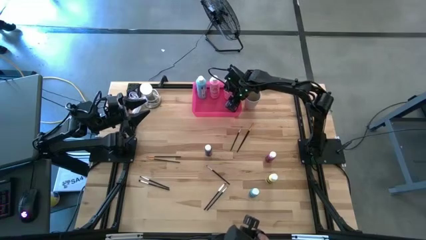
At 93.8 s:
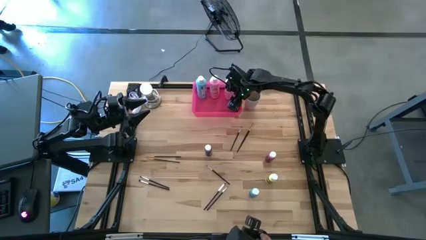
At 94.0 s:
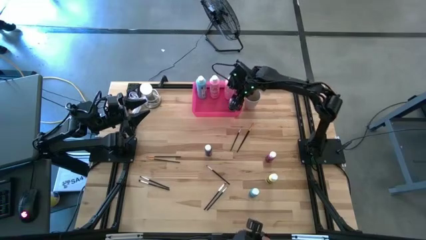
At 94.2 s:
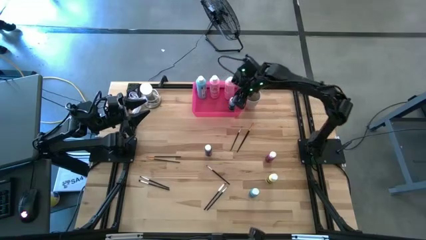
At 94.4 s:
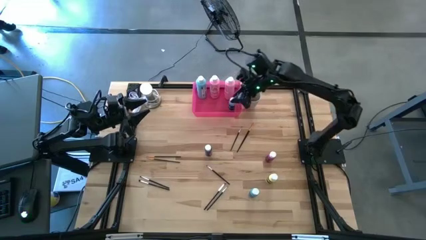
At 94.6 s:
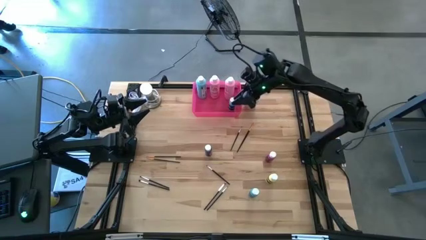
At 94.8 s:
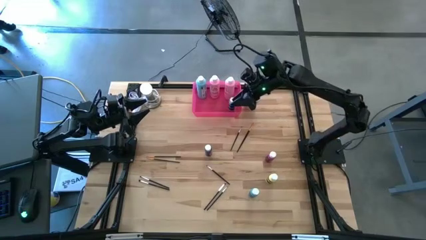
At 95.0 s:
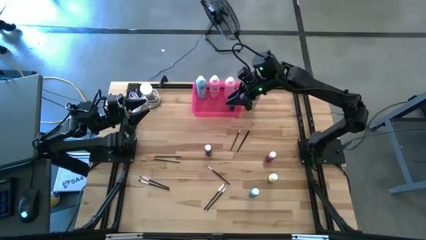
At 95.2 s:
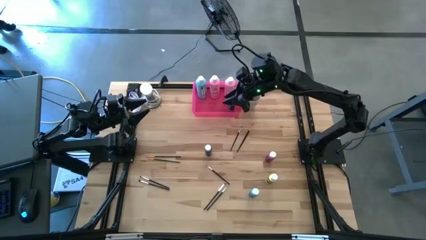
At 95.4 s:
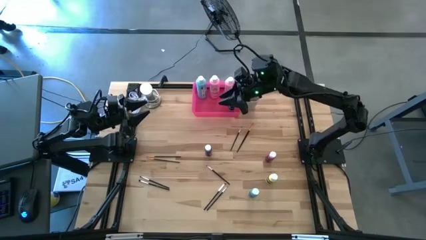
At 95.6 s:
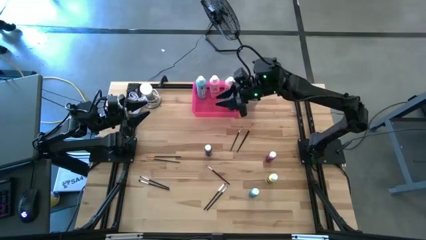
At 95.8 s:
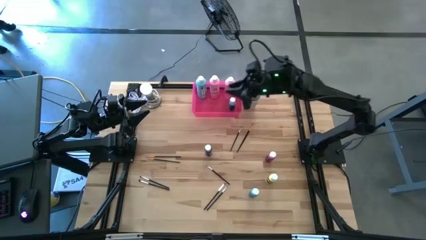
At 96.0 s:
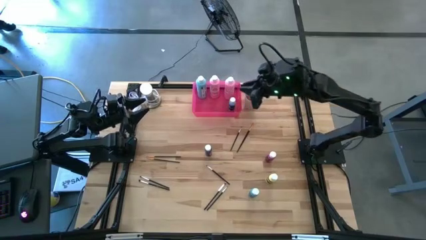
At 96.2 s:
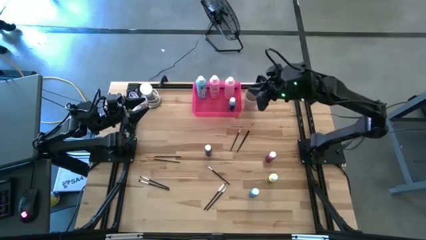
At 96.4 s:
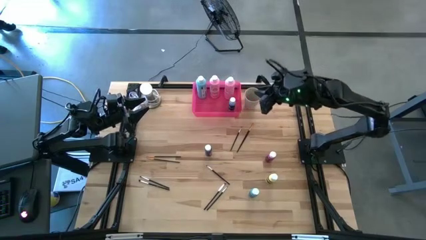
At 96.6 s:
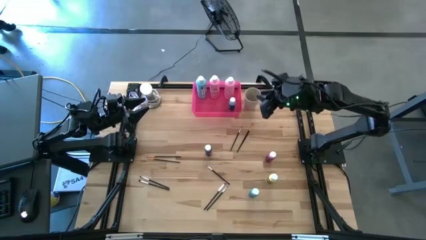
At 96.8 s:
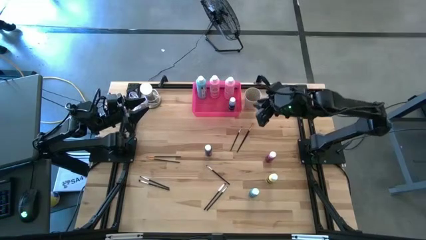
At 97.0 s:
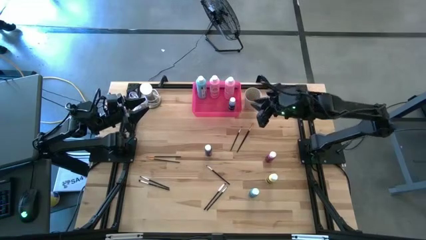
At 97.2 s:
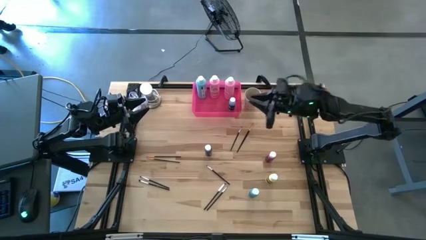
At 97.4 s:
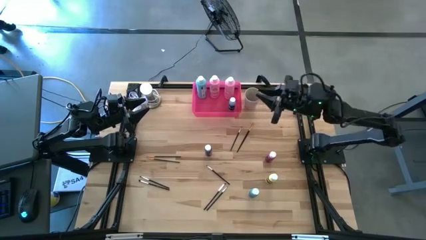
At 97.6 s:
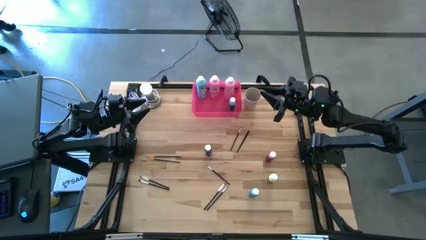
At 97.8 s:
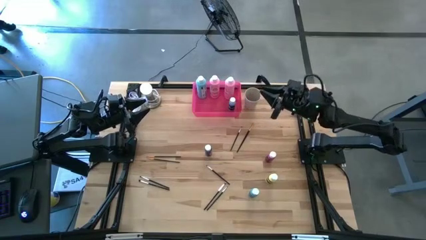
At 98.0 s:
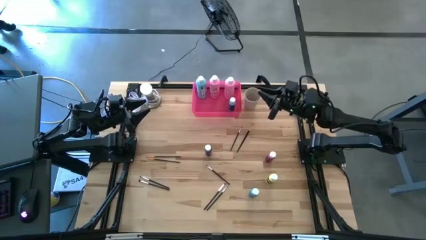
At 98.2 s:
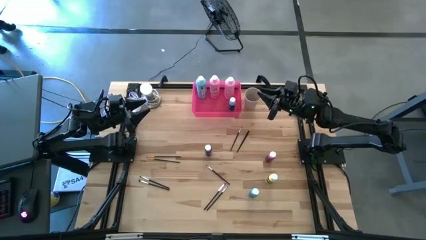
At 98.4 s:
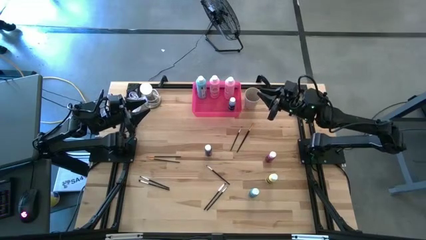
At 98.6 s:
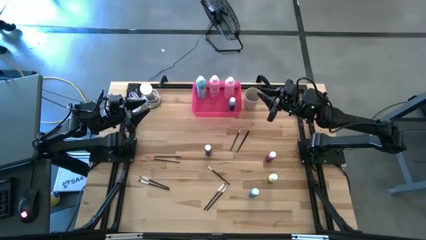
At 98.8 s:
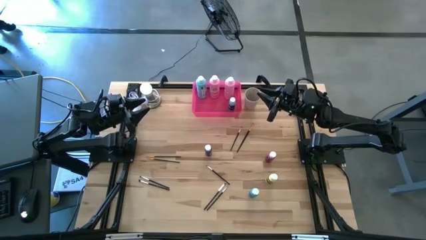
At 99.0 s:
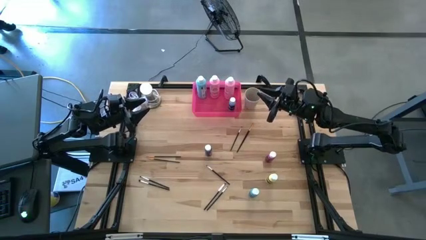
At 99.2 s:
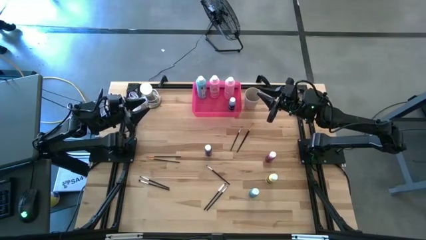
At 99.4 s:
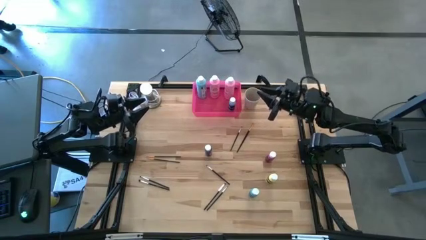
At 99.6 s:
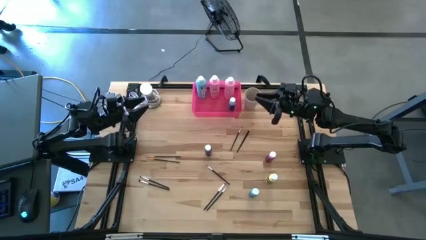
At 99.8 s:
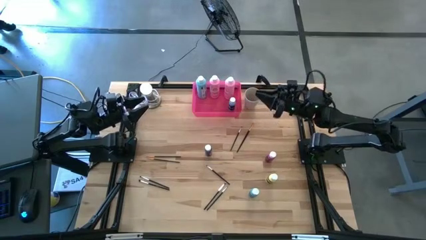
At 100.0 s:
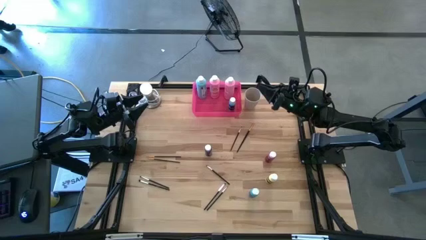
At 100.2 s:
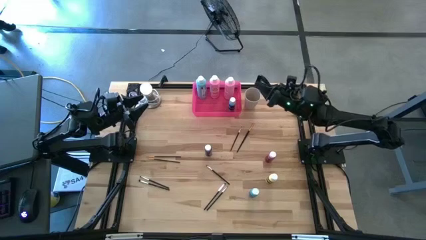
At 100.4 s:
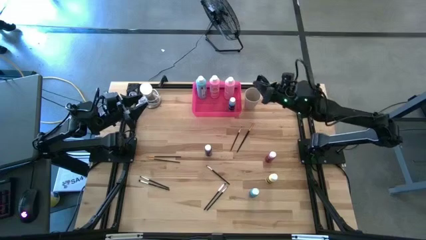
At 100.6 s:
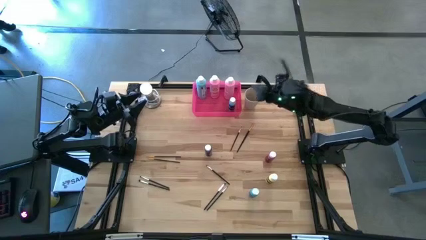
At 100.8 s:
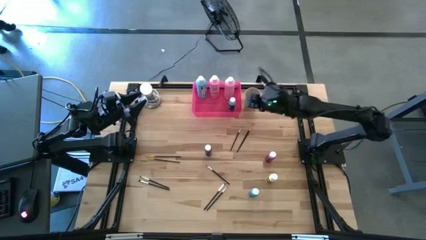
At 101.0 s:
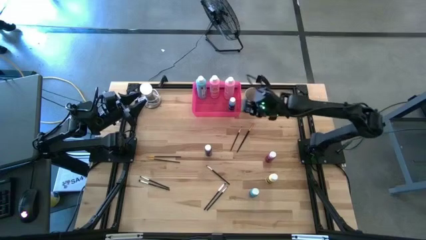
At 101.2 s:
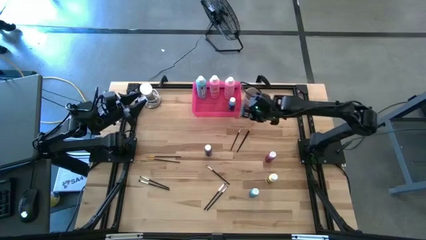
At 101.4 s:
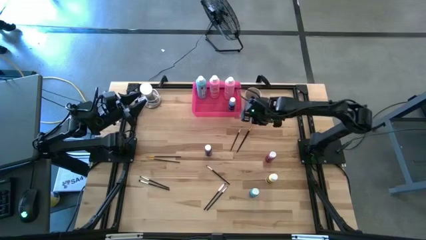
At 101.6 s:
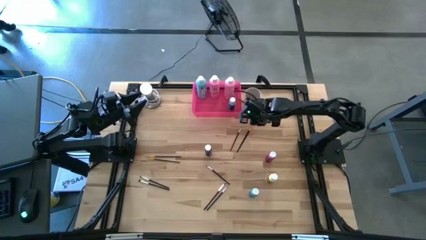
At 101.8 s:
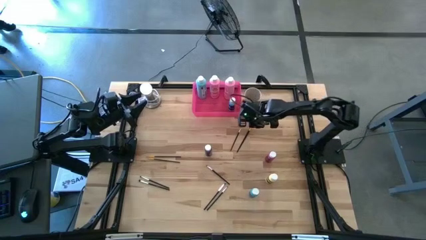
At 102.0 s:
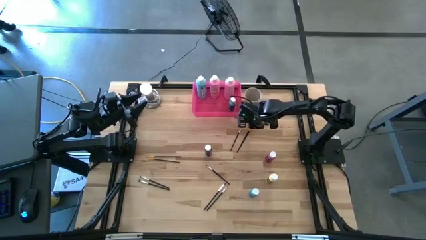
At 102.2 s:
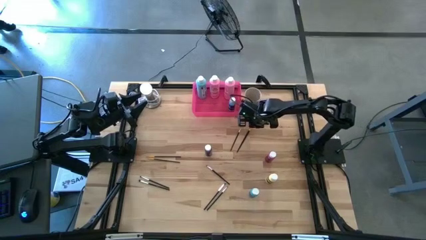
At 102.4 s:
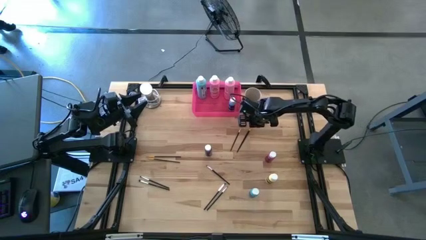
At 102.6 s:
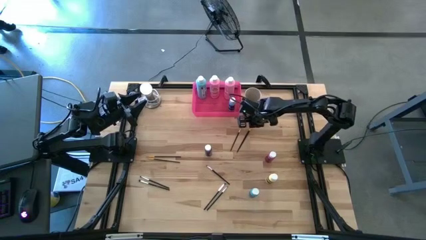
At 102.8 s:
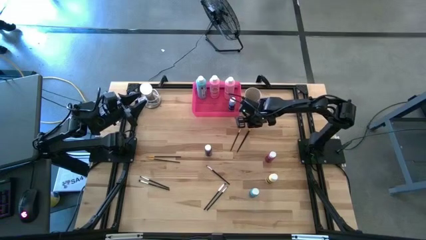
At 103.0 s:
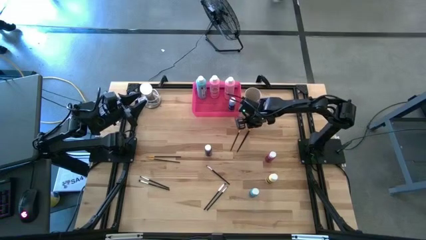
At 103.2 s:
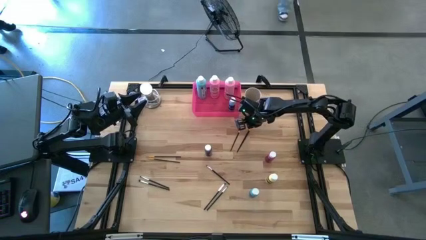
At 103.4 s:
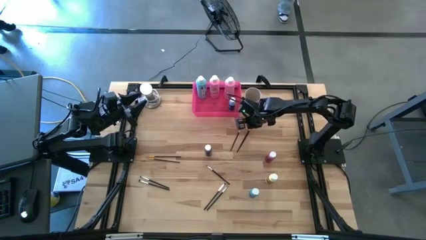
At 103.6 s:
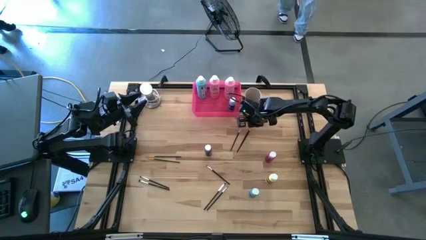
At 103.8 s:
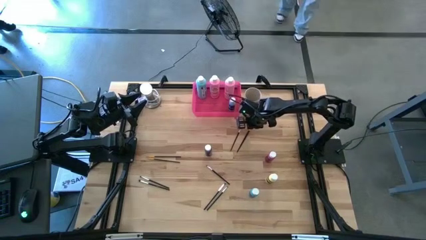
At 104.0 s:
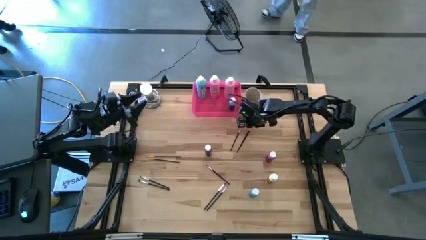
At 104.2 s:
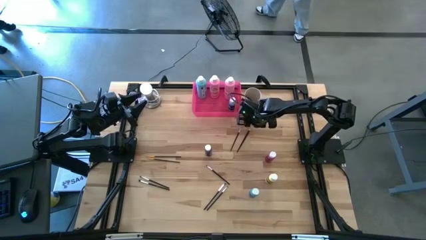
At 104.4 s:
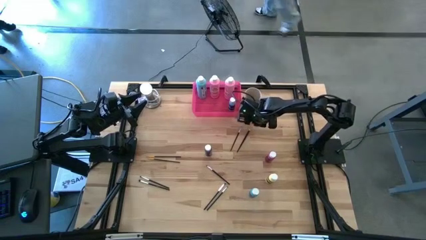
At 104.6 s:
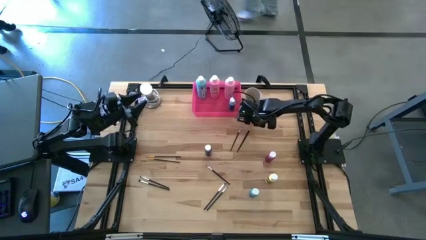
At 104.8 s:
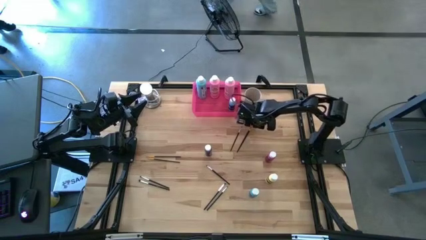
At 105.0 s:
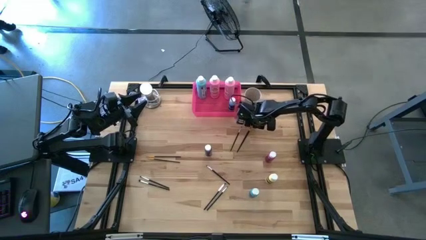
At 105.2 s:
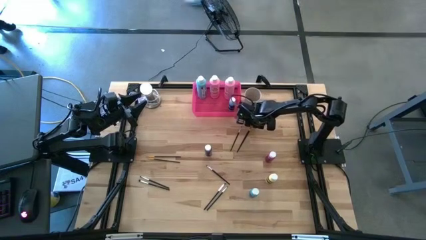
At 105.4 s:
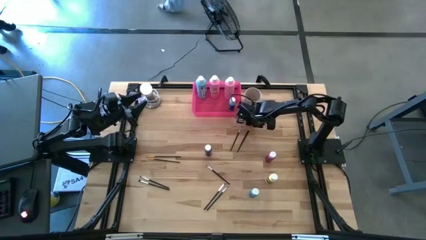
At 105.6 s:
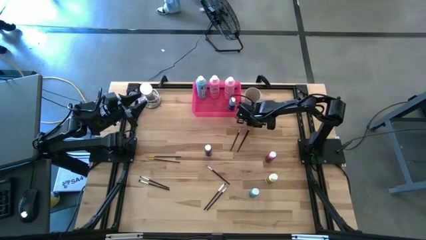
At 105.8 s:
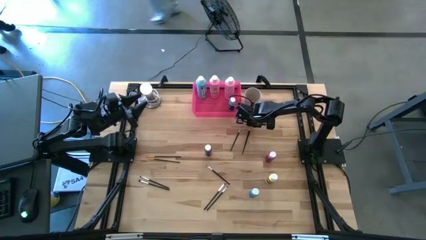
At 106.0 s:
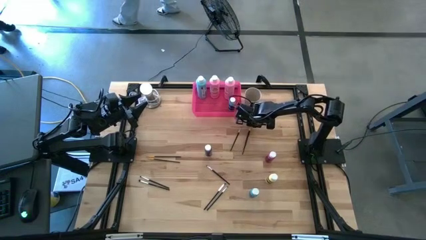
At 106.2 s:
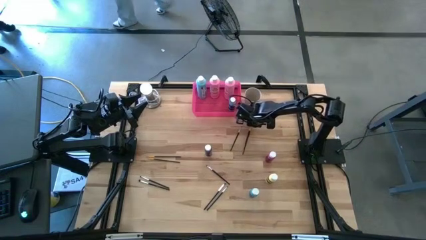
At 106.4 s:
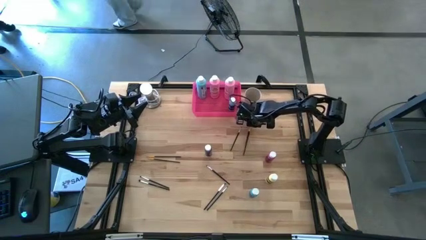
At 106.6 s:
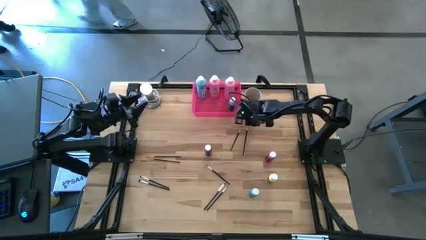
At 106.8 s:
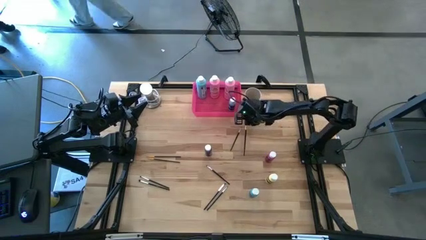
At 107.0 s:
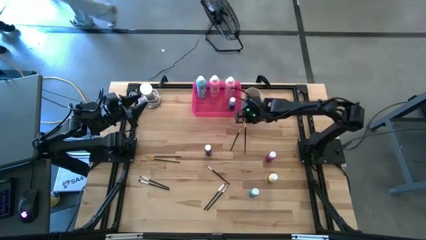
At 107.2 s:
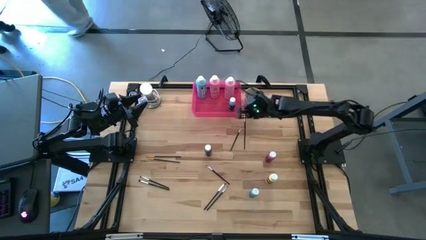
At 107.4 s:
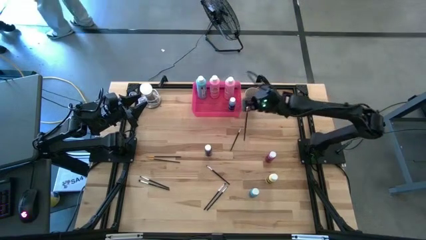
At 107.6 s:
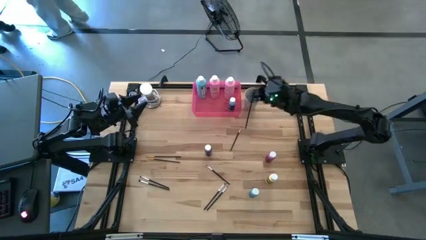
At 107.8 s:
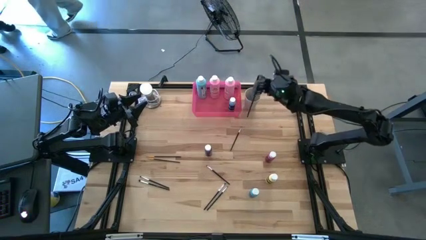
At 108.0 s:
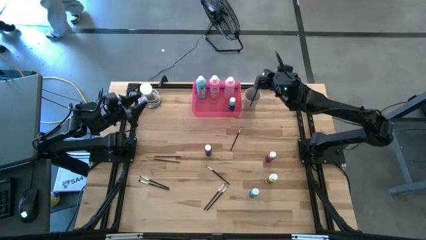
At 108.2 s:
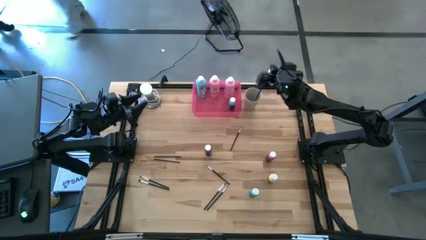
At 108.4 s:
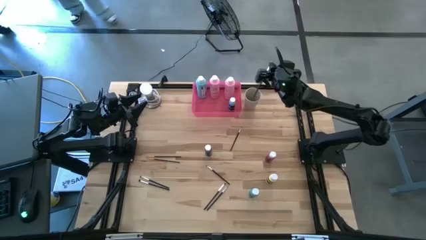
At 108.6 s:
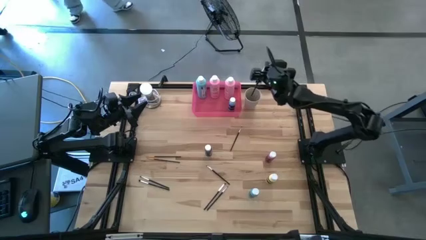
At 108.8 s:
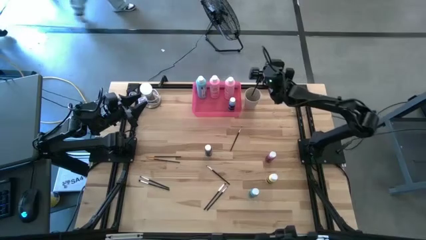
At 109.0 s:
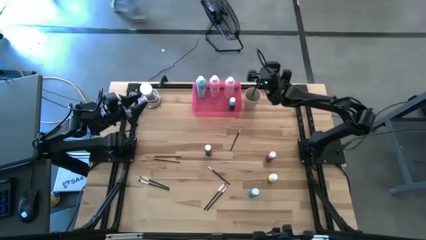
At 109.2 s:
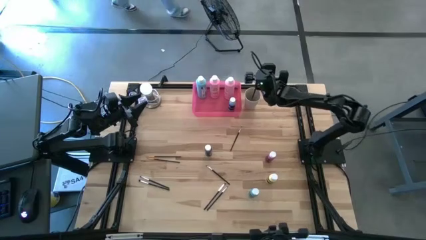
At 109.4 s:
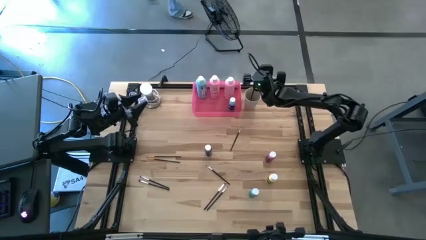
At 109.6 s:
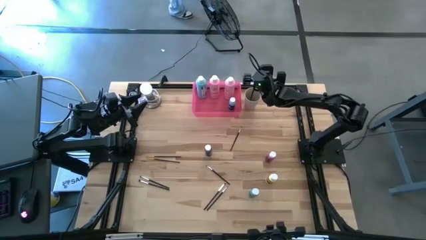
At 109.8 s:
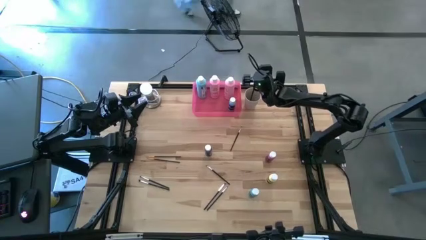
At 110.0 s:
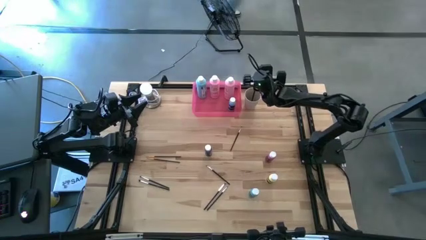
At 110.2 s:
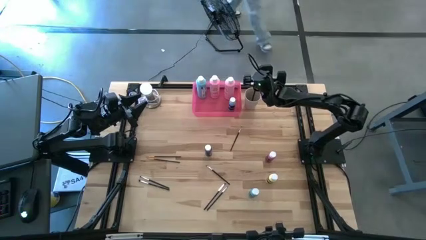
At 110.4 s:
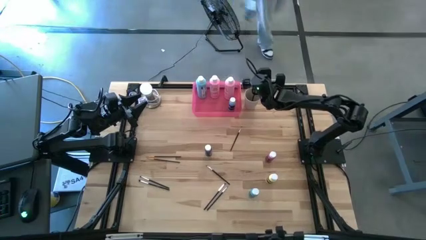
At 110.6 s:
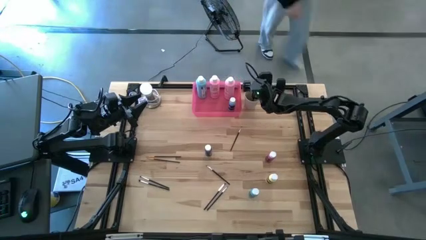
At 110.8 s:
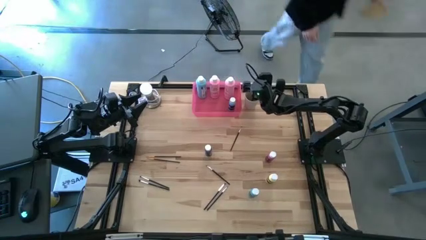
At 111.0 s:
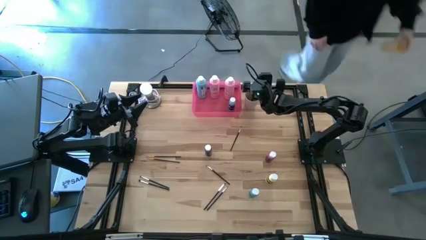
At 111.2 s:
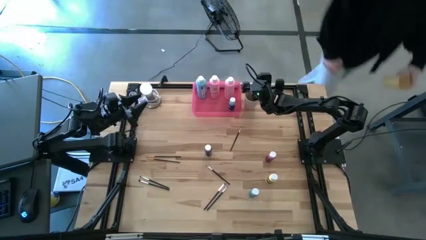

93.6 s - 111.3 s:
Task: Pick & Place Paint Supplies
Put the orange paintbrush into the white cup
